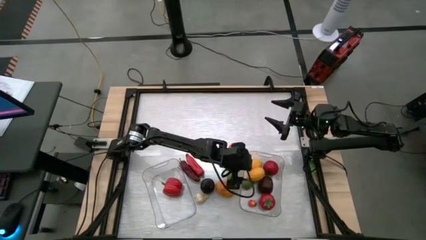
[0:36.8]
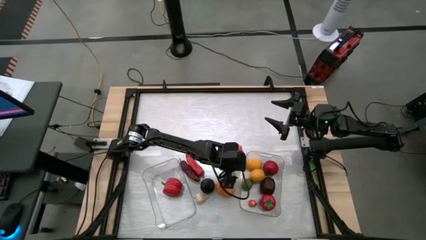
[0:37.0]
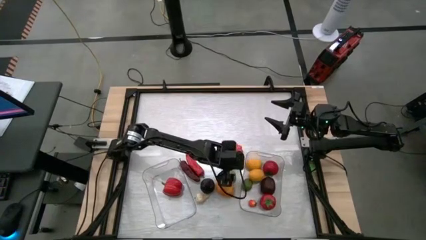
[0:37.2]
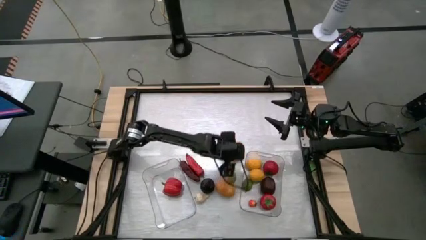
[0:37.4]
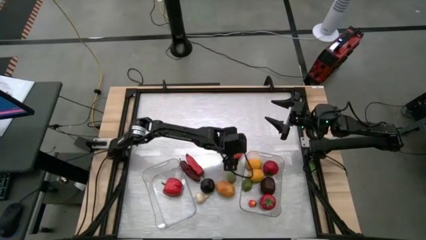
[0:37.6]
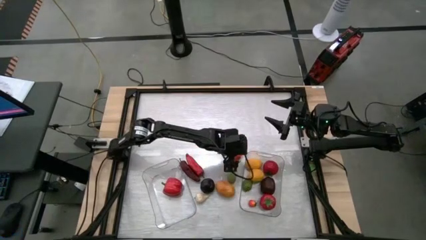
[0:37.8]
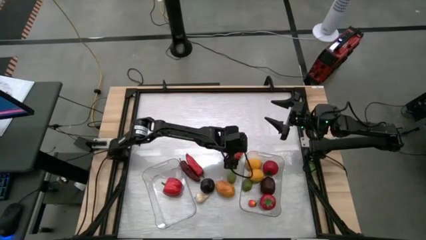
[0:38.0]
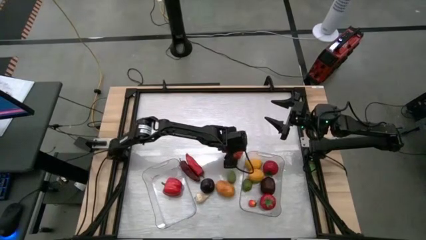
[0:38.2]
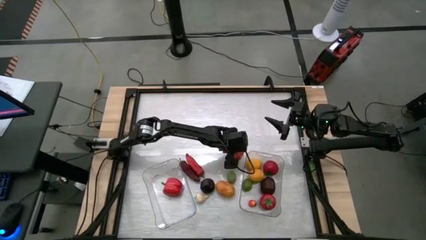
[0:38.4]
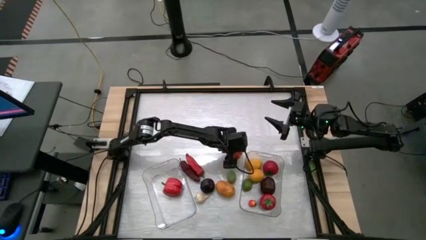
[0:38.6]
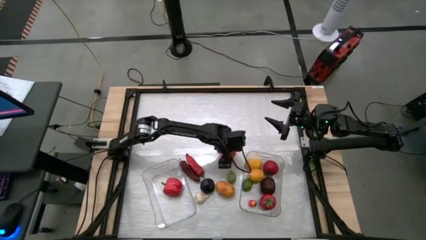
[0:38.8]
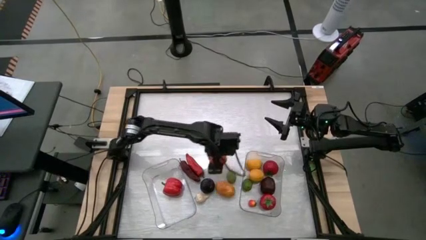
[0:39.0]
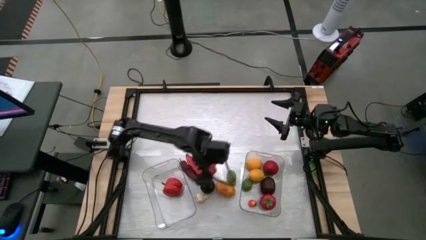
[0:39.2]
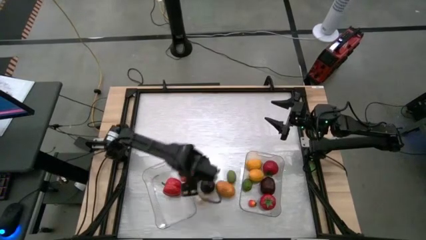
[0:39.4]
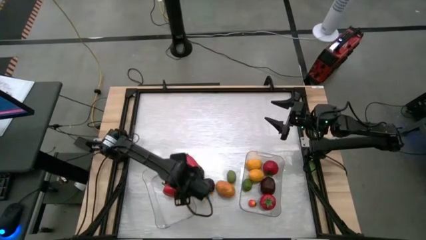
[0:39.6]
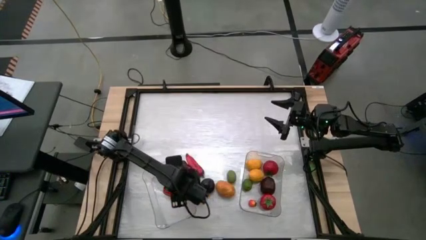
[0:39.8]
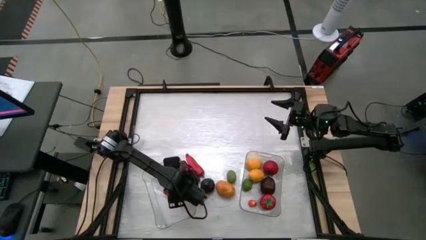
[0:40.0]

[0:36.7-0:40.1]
Task: Sort produce into baskets
Put the pumpkin into the left transparent bin

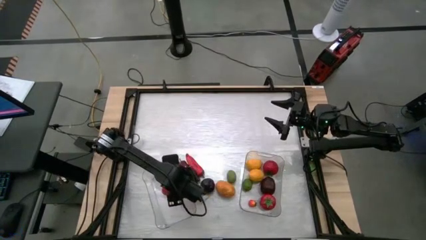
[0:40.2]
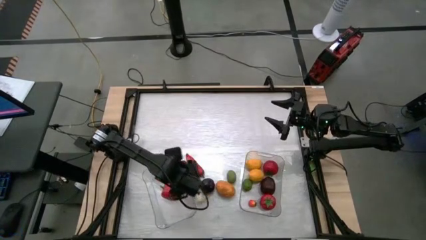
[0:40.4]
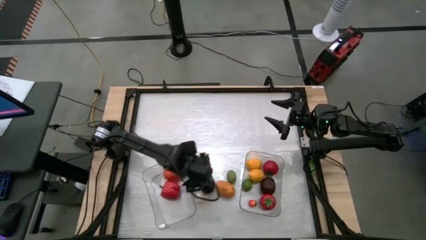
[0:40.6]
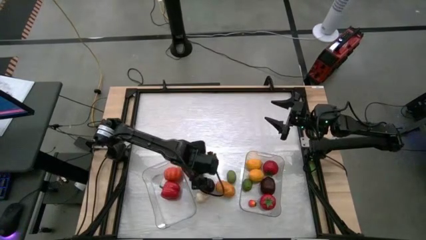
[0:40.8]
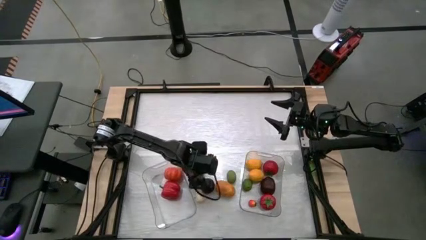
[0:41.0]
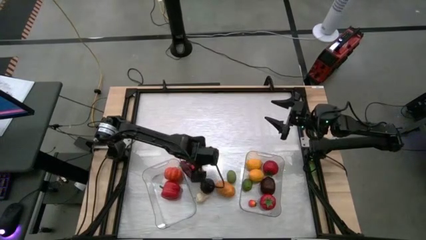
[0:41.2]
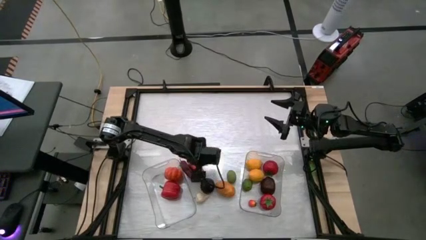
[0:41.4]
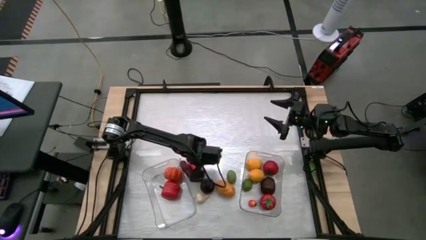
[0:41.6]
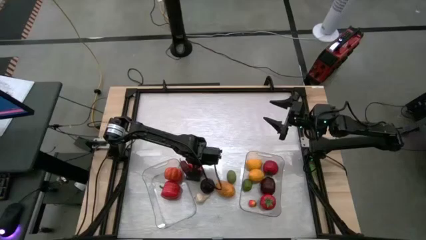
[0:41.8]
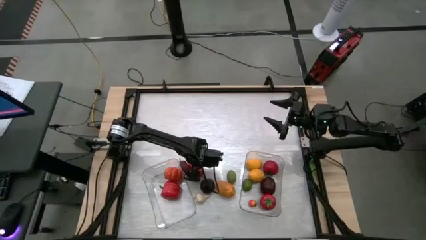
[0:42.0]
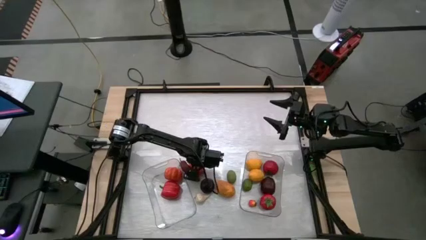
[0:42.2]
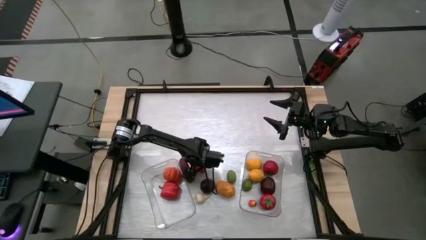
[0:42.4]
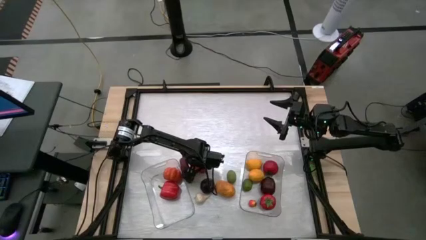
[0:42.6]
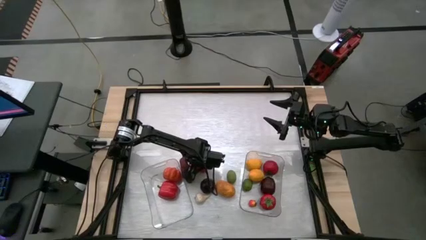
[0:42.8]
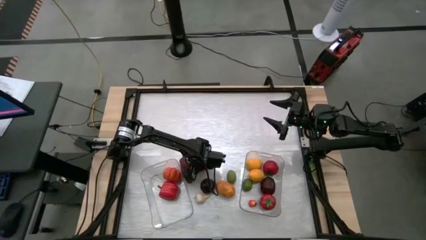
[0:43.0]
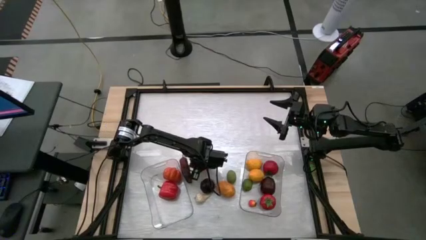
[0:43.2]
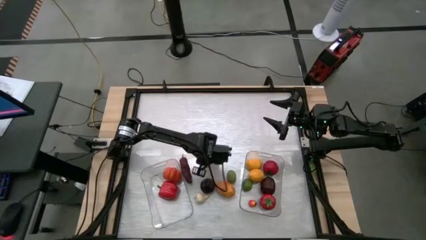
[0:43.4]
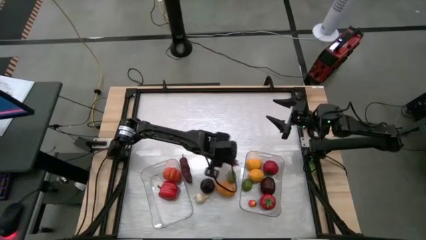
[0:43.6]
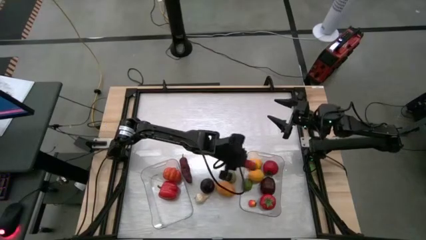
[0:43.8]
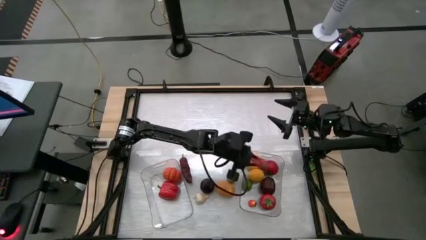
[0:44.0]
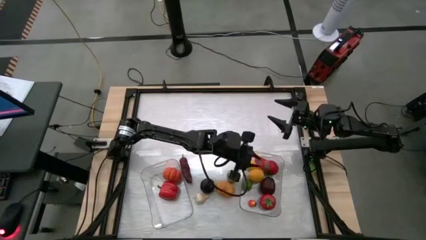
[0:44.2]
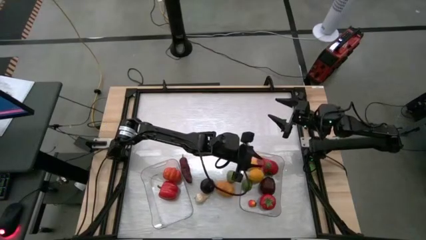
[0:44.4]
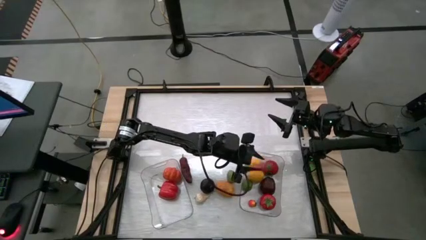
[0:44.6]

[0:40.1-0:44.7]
Put the red chili pepper into the right transparent bin

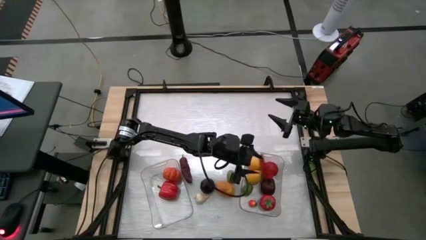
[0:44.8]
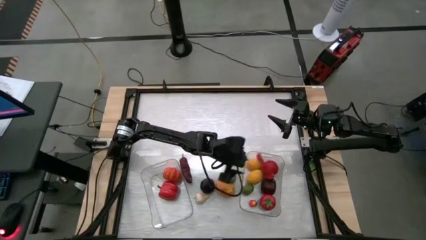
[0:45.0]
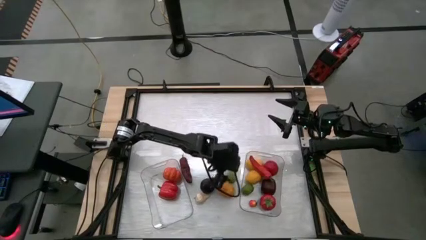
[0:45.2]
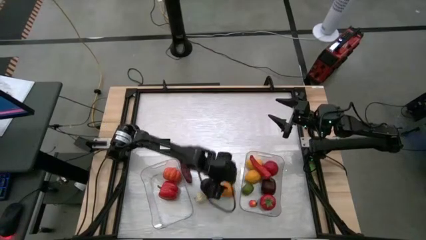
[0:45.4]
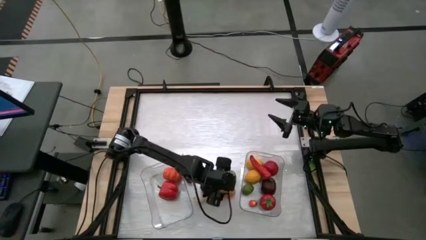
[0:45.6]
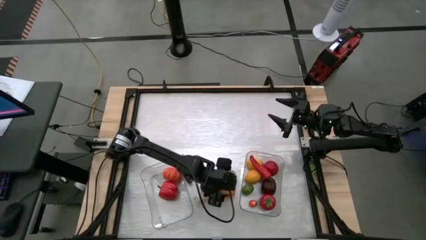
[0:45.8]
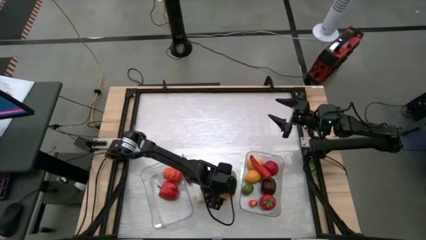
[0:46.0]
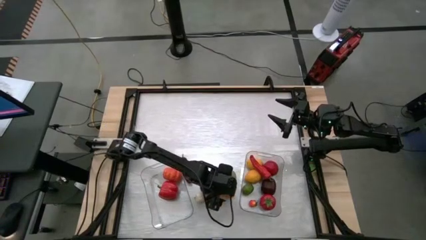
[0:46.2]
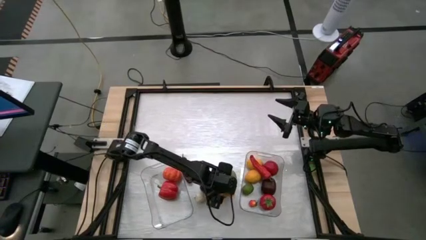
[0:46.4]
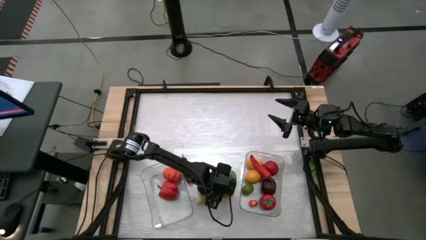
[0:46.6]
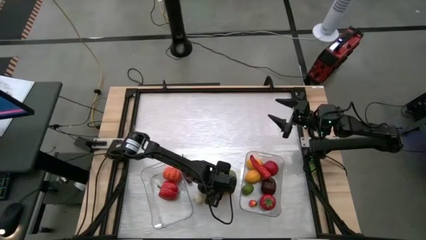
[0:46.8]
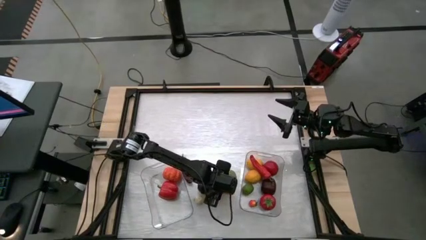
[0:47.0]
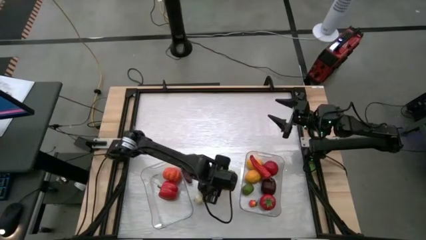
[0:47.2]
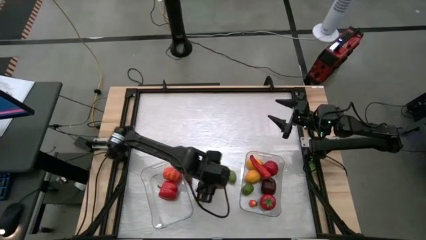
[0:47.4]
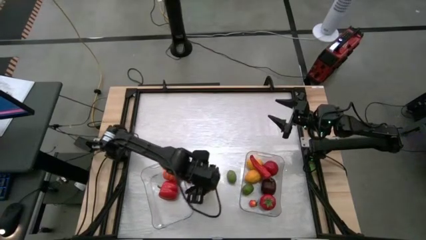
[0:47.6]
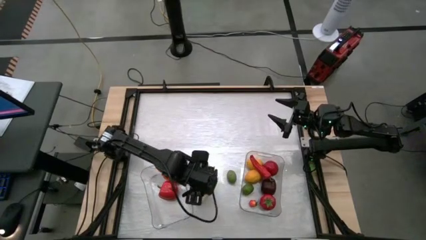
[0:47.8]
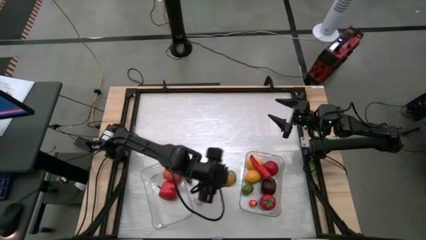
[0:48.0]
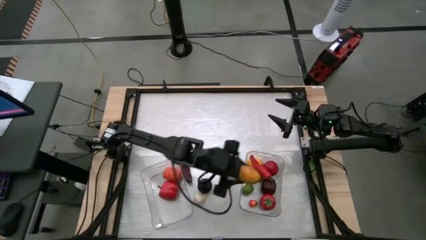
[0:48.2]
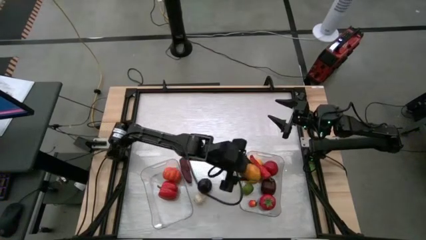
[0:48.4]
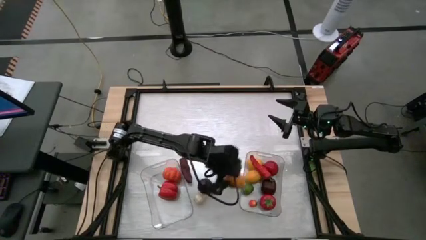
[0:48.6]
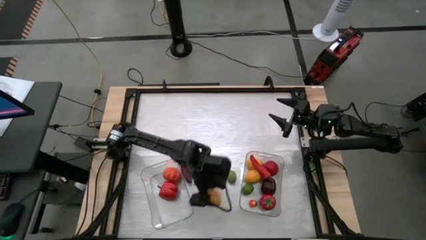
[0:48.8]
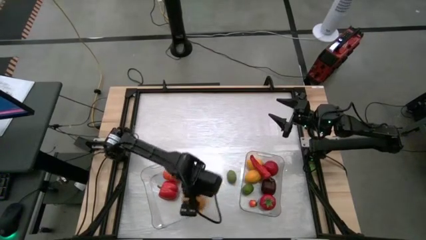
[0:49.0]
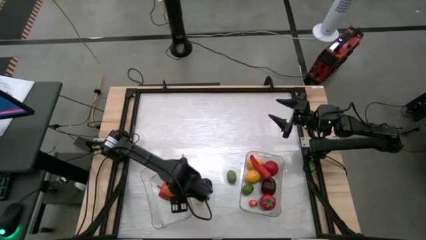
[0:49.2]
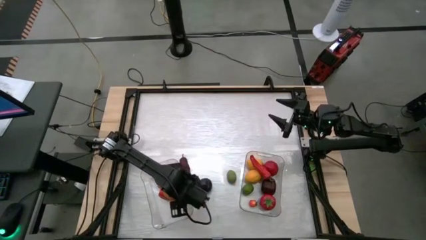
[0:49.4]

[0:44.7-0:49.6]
Put the mango into the left transparent bin

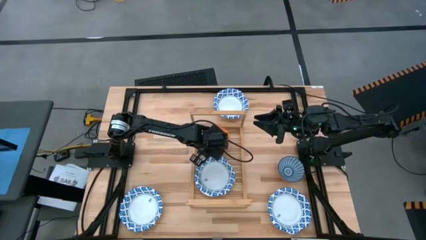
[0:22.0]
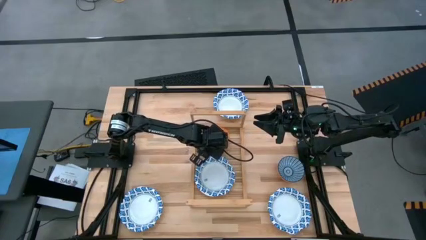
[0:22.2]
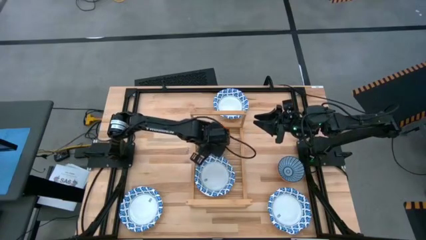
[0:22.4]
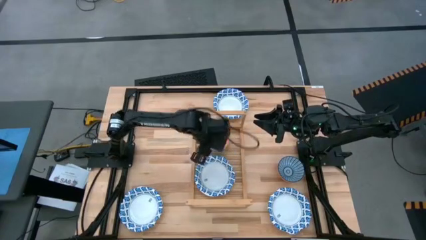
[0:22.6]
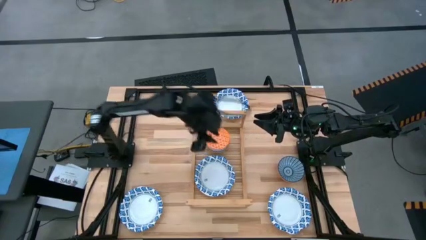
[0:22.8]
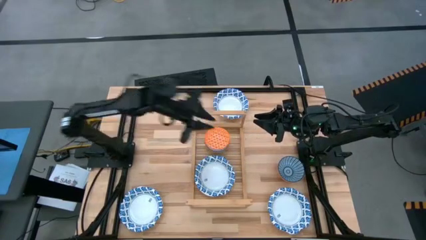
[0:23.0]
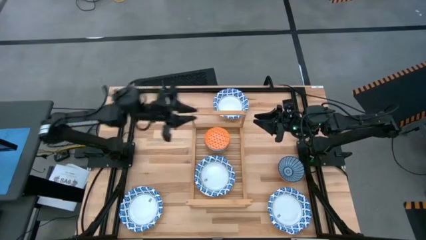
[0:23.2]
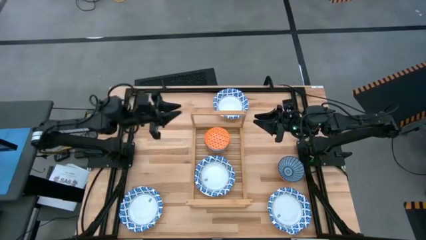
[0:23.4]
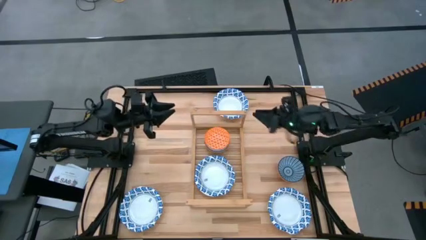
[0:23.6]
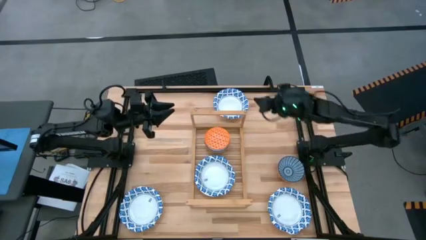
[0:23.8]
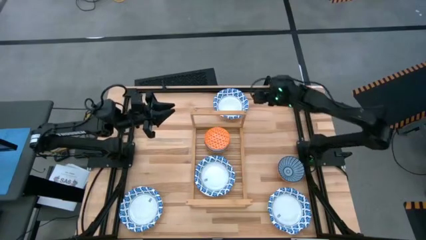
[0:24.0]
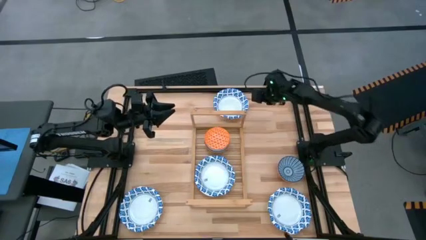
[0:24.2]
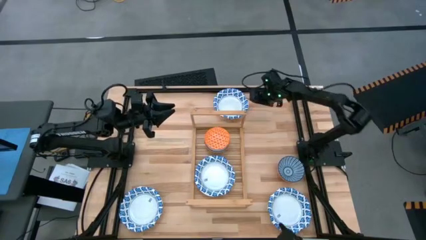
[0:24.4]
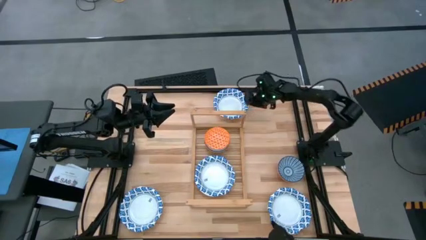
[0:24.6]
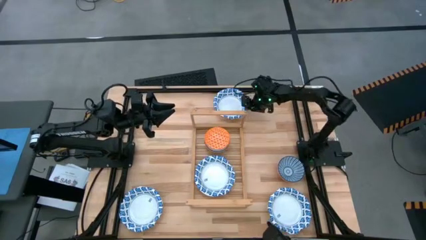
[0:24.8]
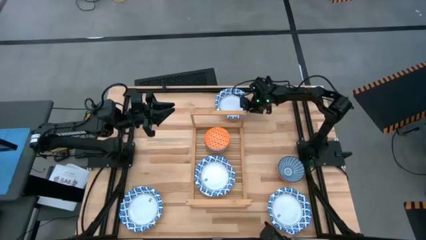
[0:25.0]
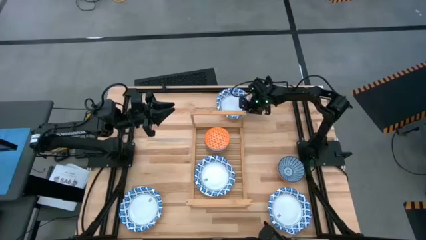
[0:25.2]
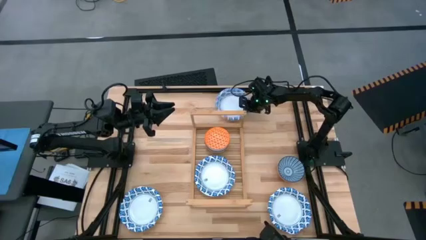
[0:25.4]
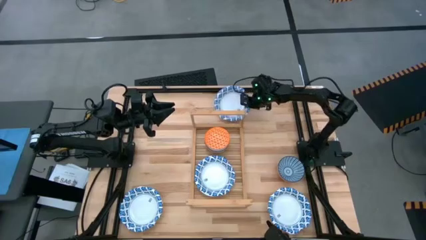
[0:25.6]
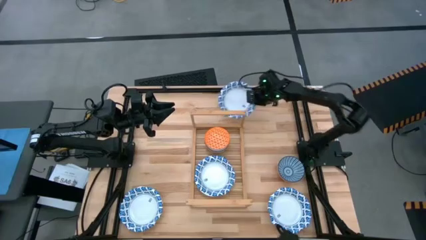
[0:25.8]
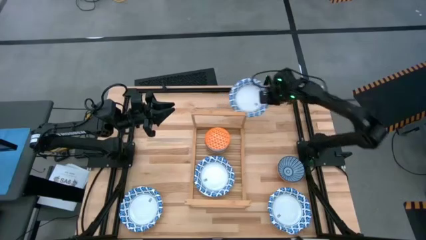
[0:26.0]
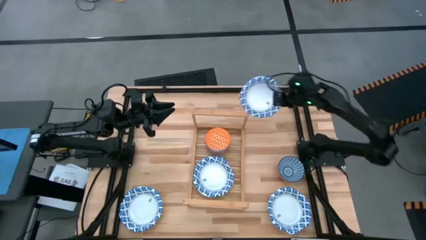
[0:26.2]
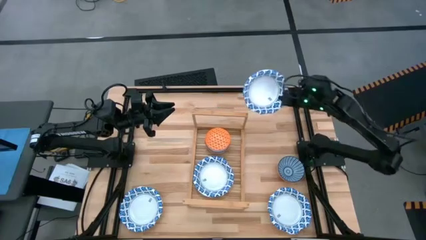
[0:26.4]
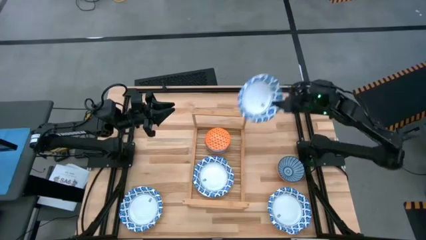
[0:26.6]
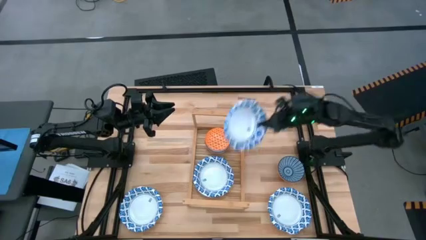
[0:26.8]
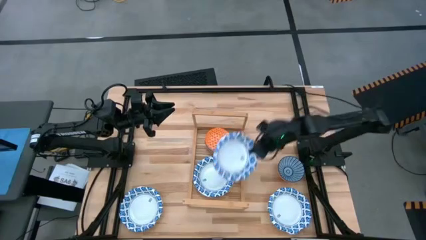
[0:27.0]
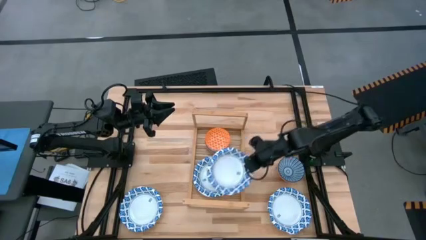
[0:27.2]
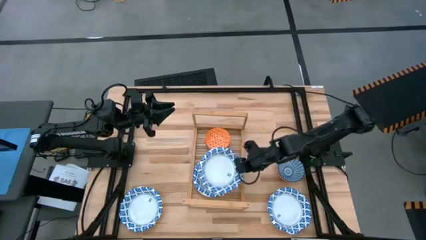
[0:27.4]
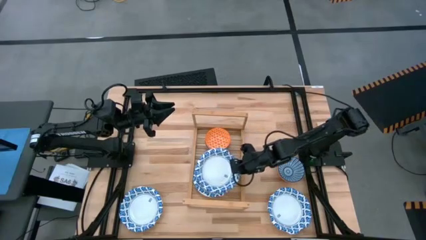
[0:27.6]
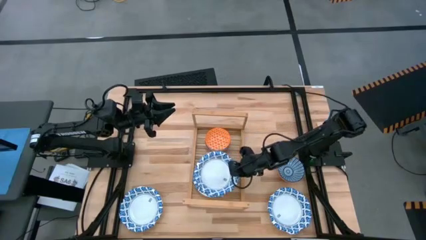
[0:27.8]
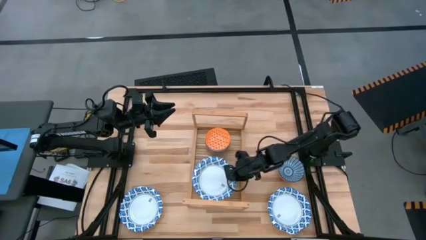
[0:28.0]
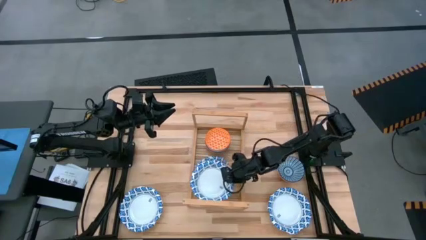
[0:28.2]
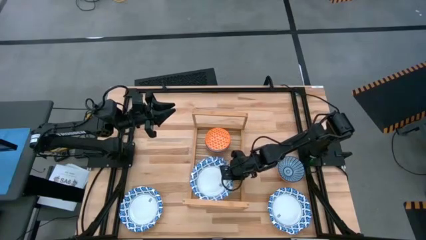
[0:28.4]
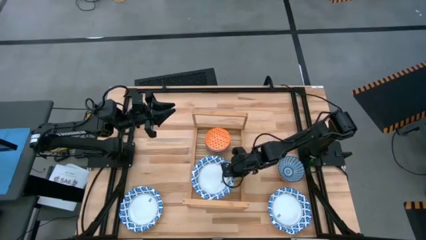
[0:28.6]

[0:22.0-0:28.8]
Task: Place and stack bowls onto a shelf
Stack the top center blue patterned bowl on the blue patterned bowl on the shelf
